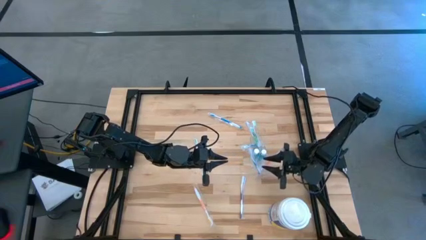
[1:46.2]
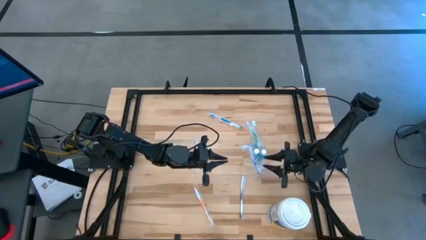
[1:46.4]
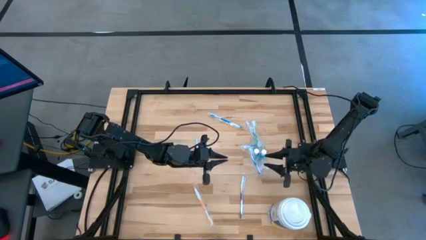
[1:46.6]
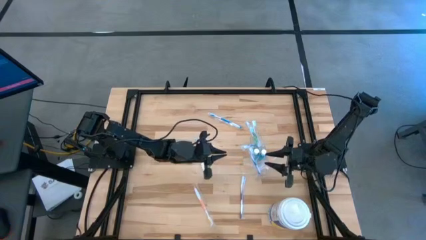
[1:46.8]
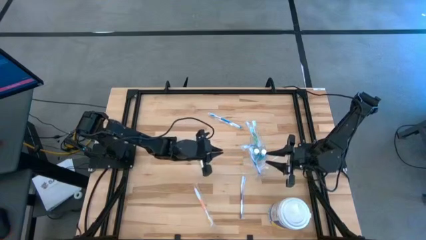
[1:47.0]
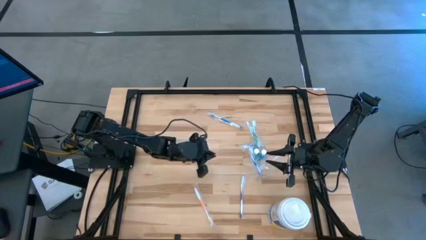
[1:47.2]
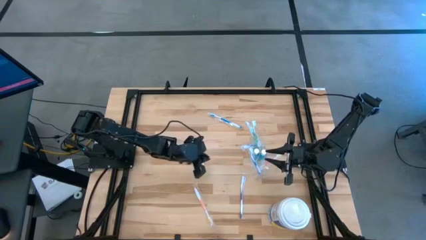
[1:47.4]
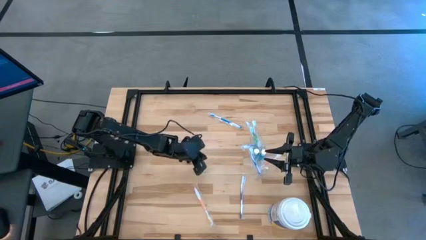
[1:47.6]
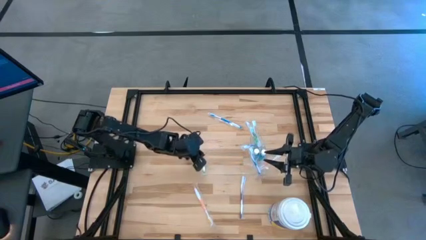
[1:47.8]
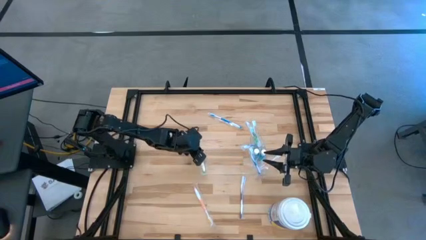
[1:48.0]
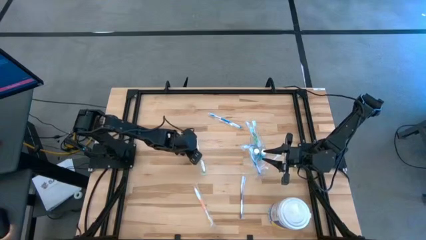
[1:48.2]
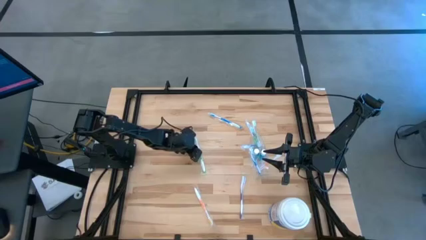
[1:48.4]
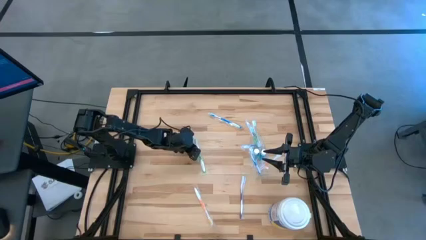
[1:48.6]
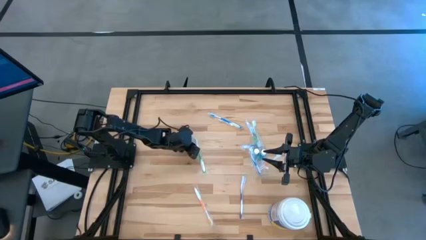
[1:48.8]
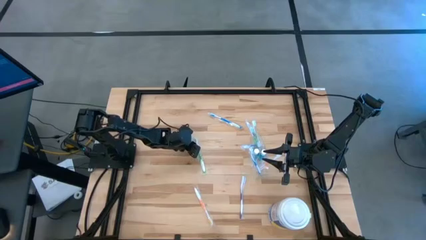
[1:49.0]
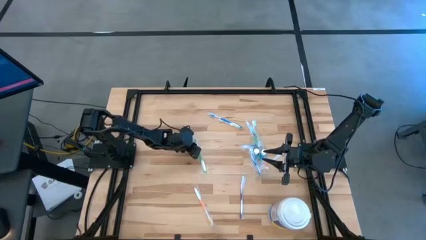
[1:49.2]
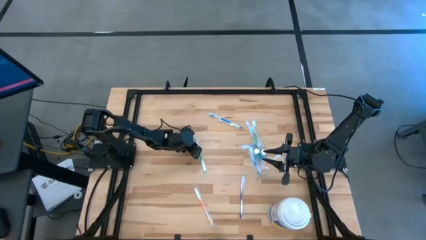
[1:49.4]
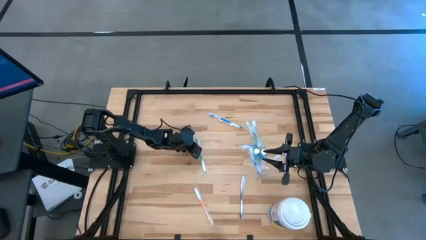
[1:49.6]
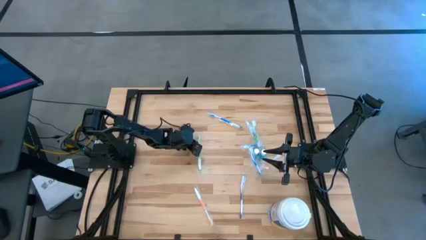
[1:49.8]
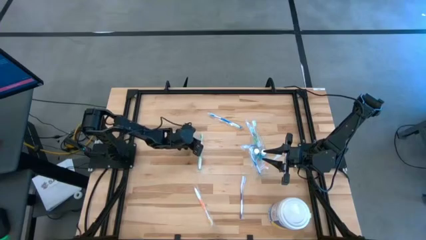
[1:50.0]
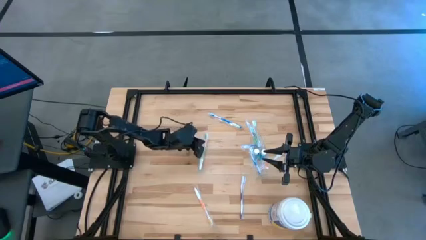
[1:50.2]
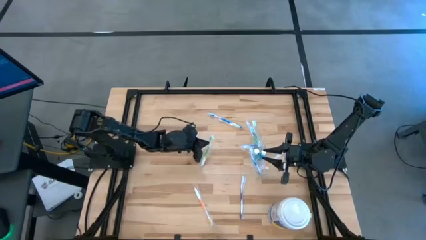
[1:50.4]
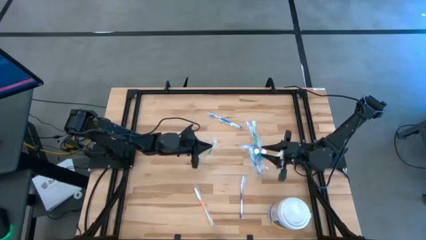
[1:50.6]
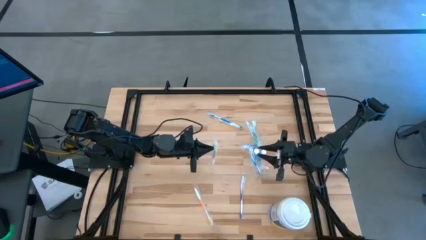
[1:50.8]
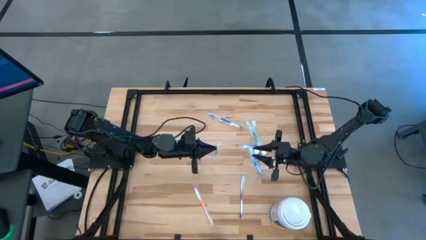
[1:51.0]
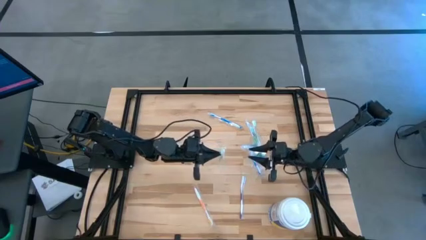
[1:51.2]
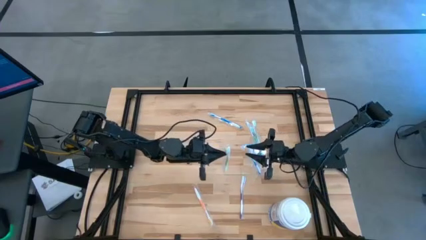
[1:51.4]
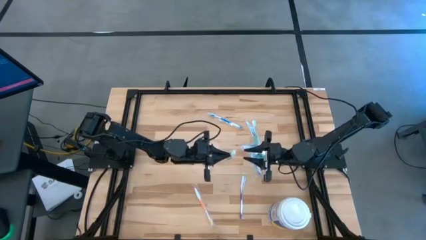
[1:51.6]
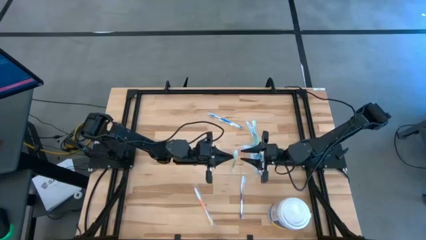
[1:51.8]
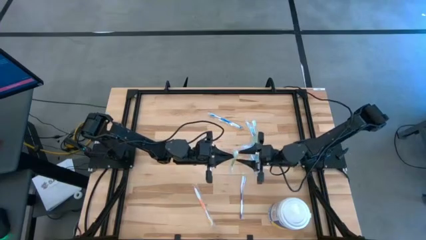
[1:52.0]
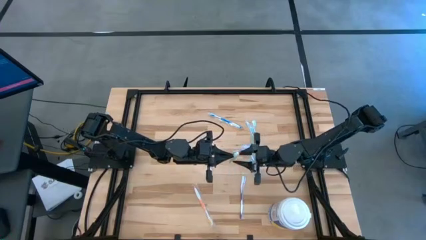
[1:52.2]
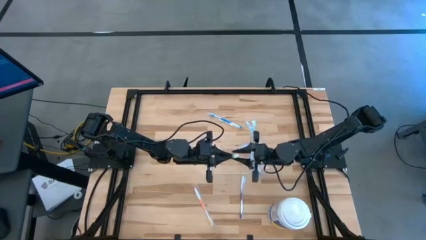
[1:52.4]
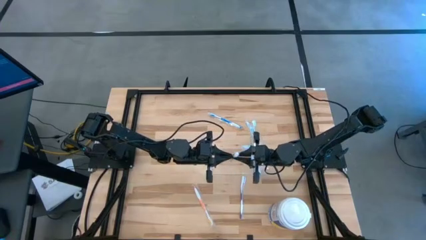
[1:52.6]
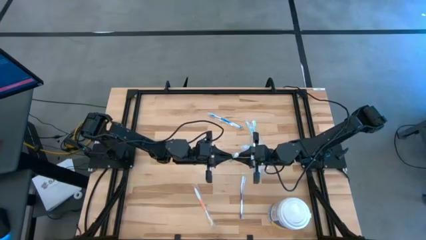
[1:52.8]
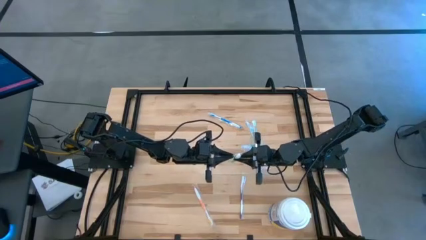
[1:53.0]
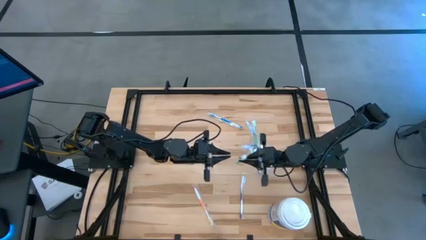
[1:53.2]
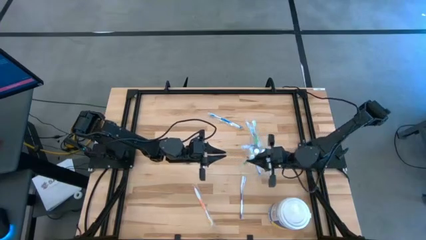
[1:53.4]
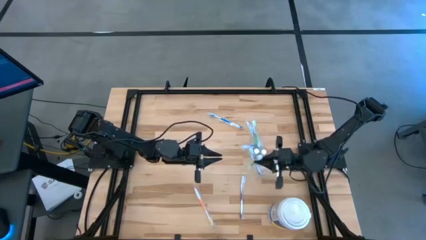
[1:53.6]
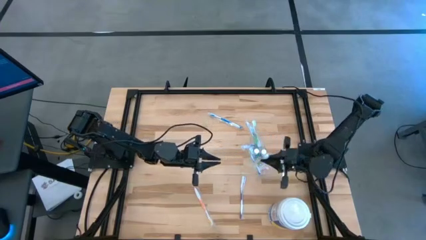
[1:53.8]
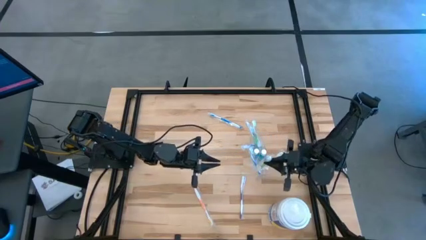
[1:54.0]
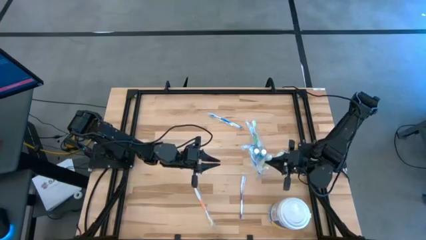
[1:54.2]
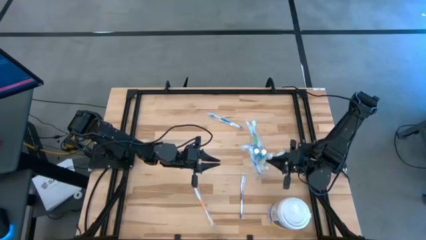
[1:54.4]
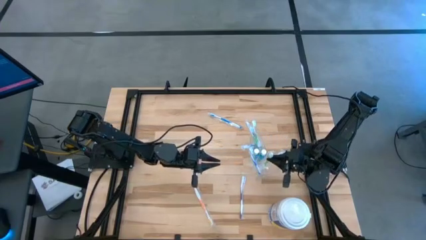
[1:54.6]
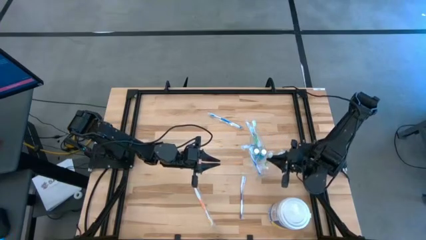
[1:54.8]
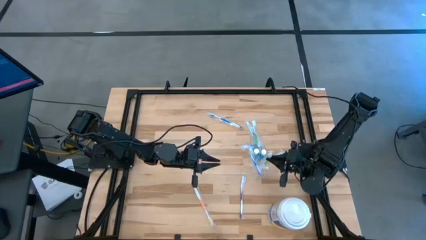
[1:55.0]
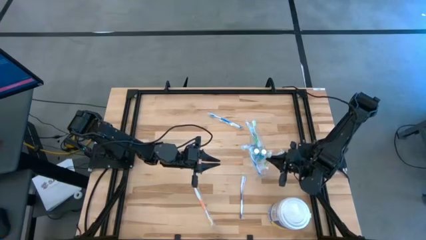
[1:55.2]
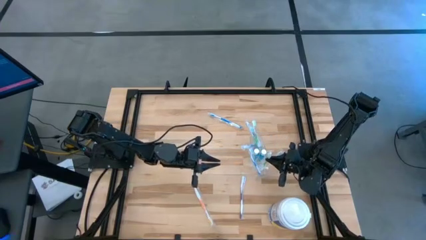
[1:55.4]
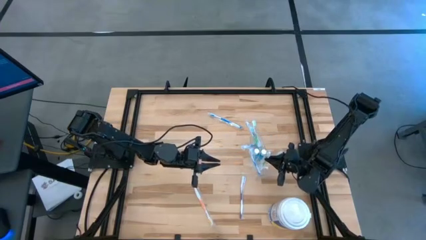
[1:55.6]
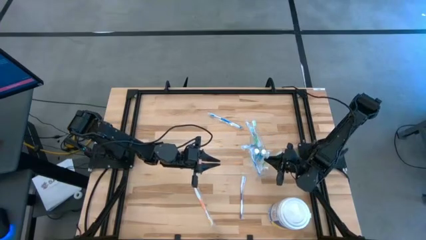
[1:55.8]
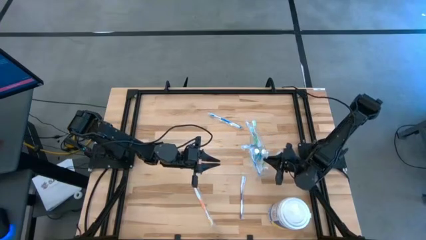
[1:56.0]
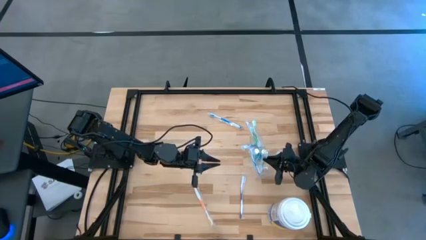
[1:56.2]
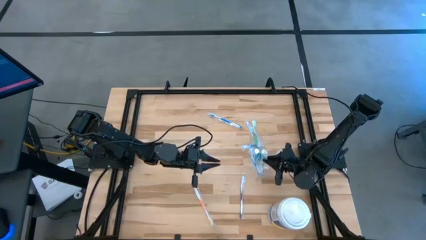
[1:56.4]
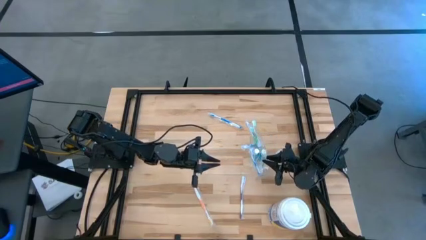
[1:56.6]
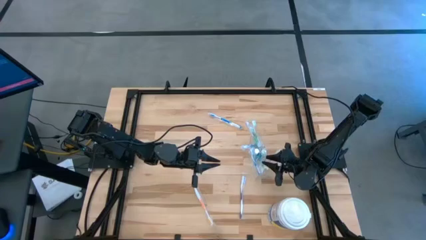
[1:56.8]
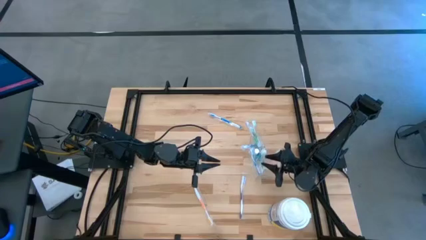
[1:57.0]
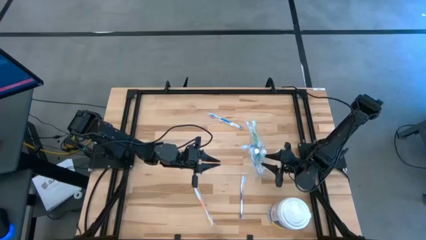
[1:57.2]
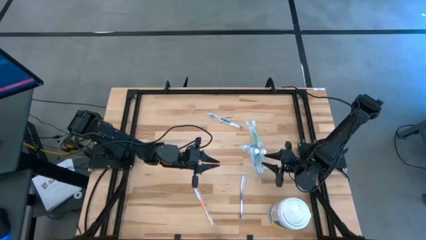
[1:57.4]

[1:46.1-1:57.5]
Task: Pick & Place toothbrushing station
Put the green toothbrush into the transparent organizer

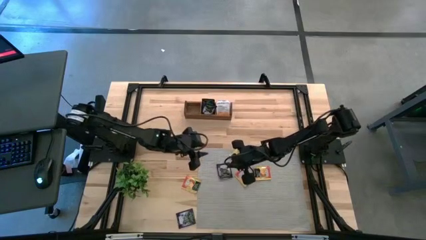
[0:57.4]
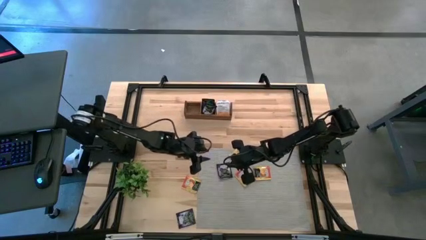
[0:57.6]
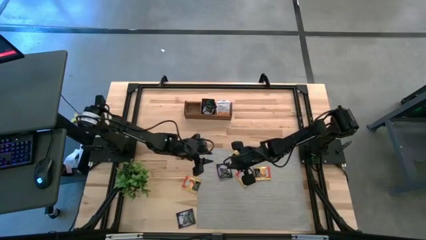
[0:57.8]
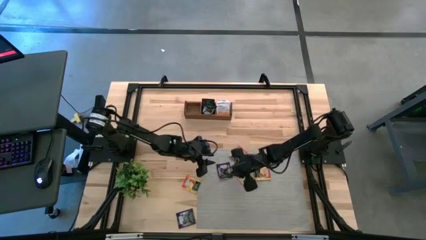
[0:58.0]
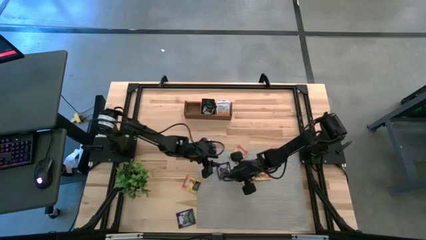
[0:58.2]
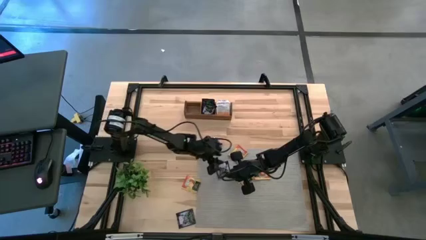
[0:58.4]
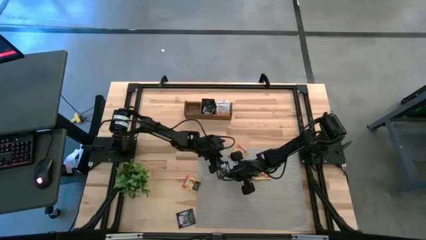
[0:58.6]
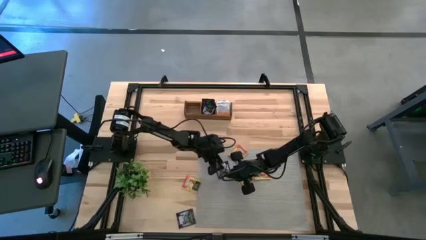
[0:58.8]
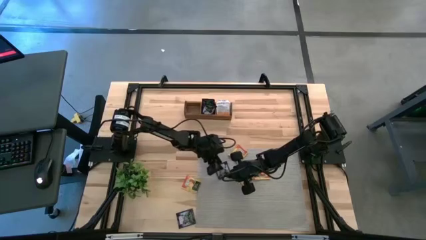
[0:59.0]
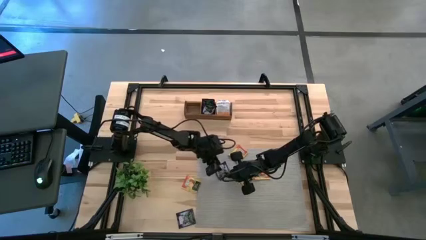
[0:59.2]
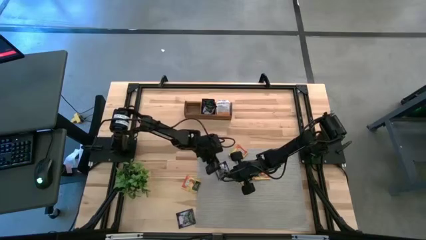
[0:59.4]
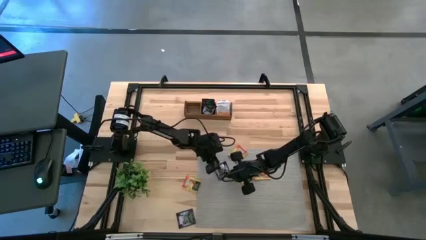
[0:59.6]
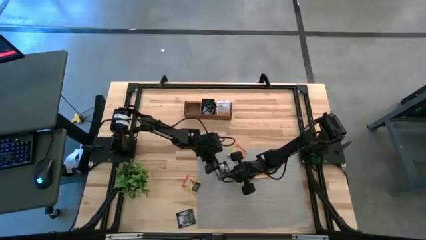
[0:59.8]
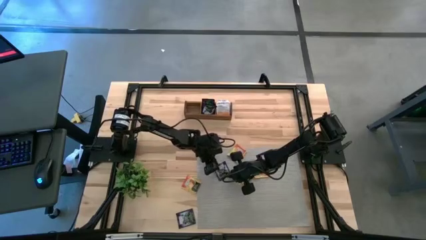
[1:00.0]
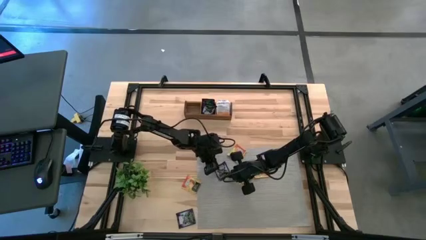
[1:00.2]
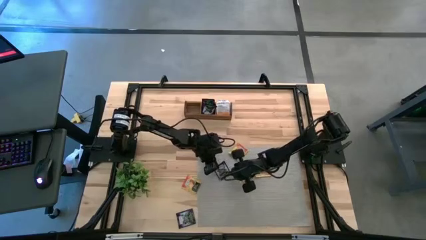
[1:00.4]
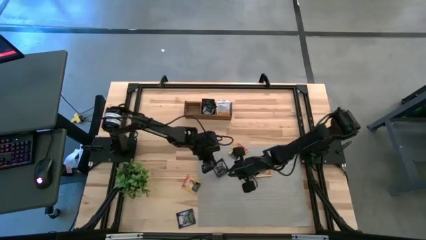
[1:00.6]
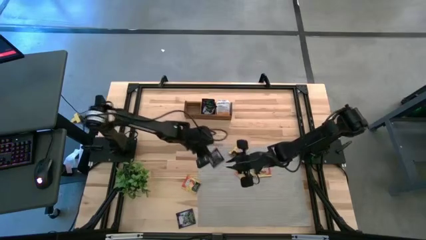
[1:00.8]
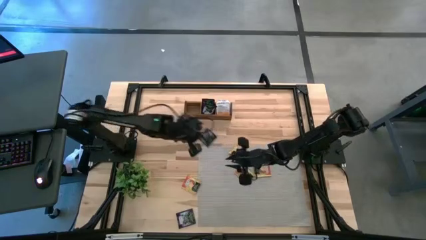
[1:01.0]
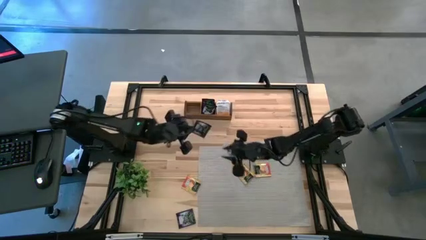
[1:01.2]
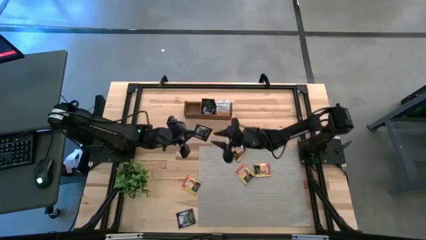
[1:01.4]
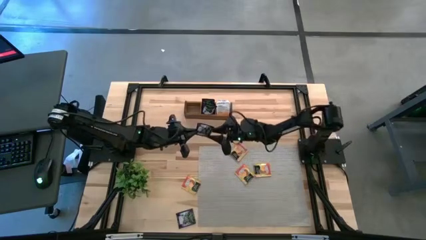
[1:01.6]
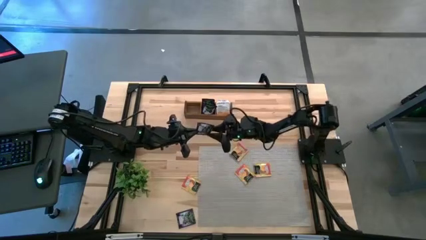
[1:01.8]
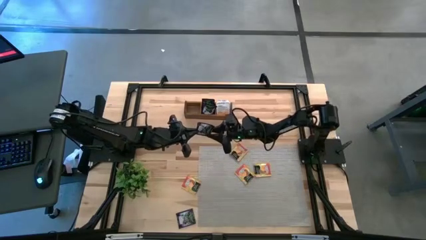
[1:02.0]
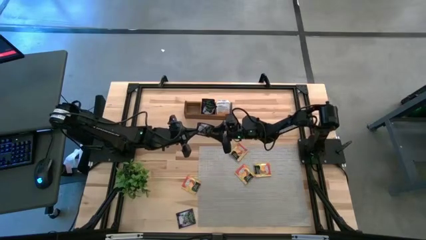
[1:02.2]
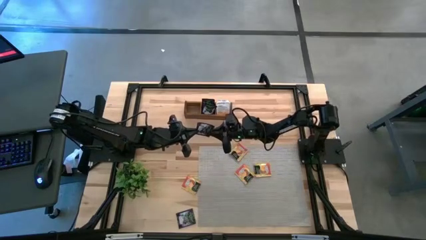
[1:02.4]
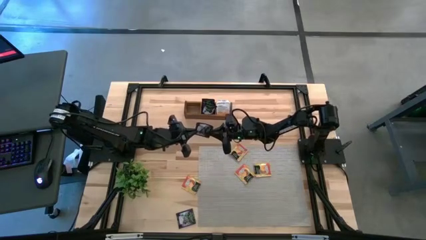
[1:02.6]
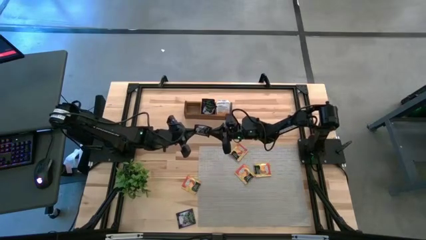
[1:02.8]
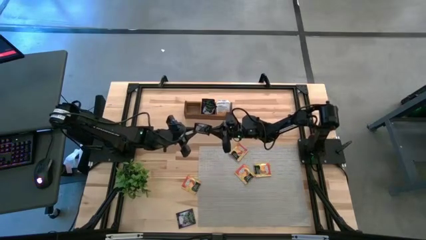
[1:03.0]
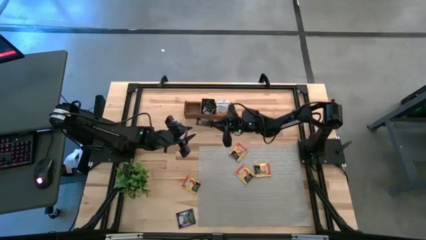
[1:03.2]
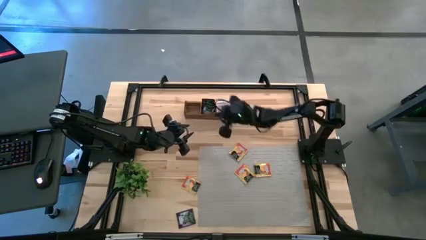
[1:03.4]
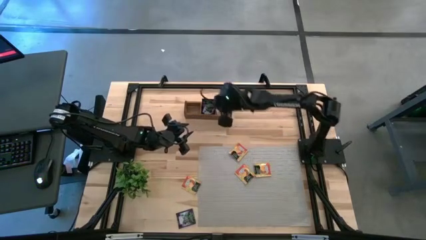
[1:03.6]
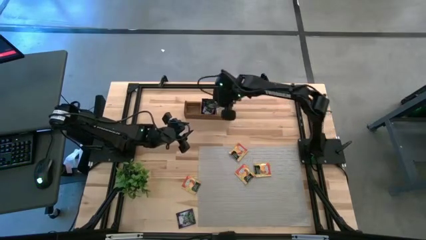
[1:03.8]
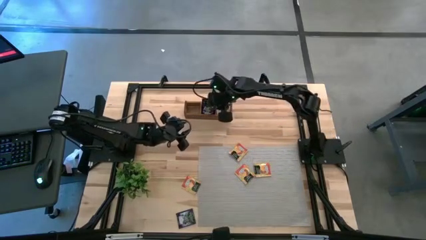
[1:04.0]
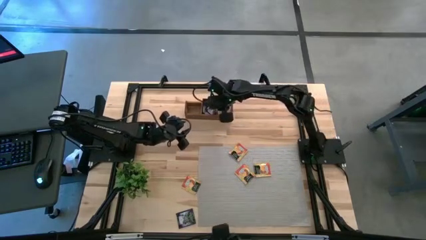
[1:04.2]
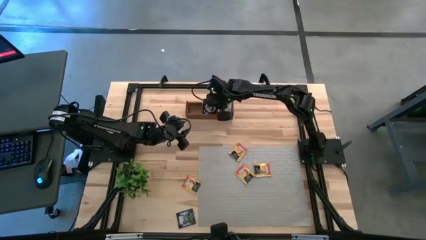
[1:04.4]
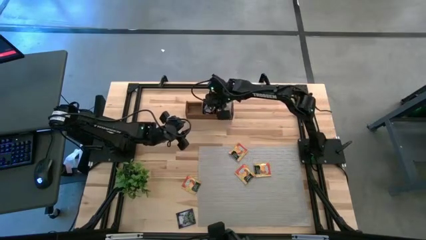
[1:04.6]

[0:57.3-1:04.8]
Task: Pick & Place Tea
Put the black tea bag into the middle section of the wooden organizer
